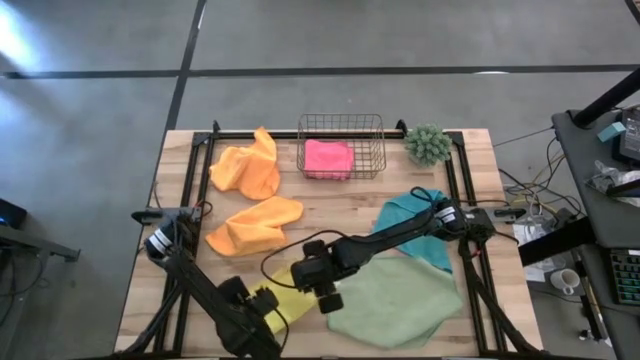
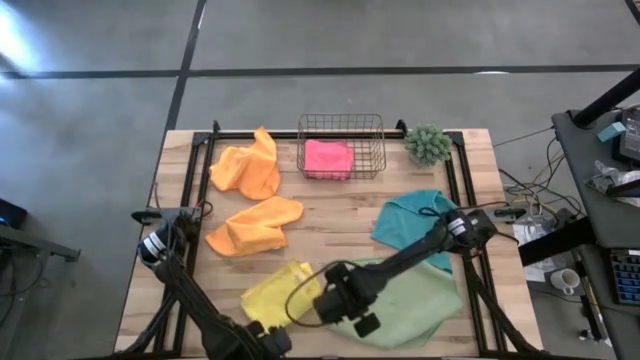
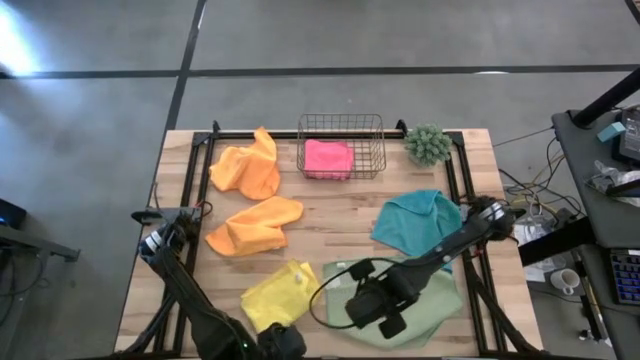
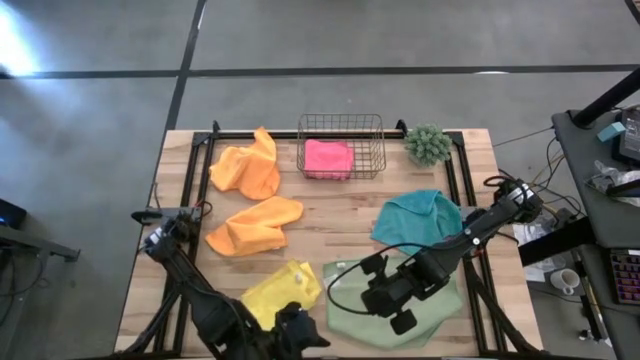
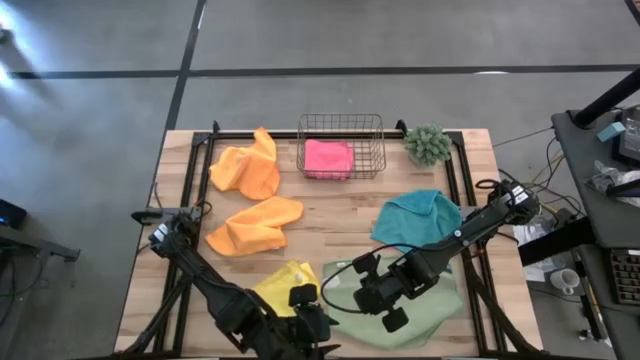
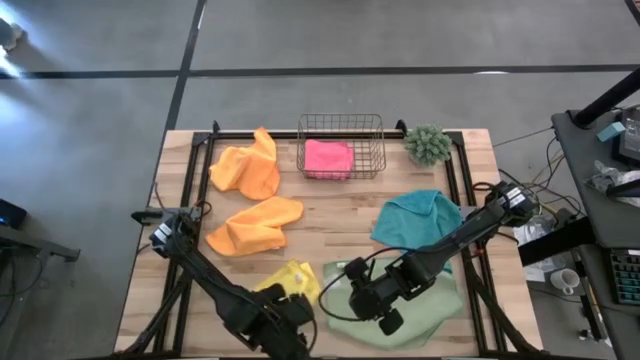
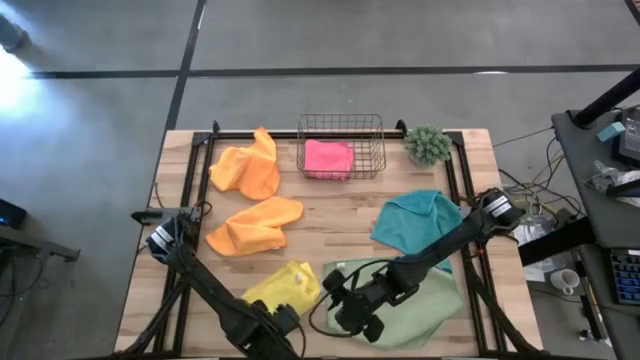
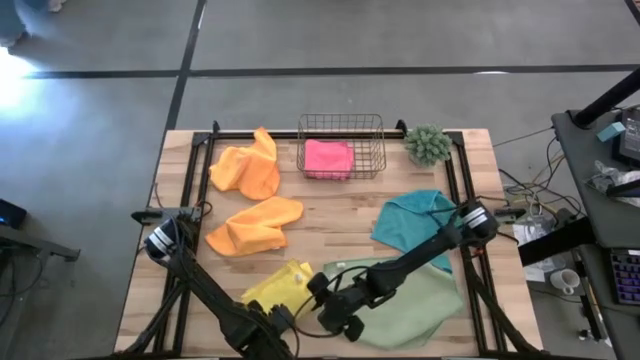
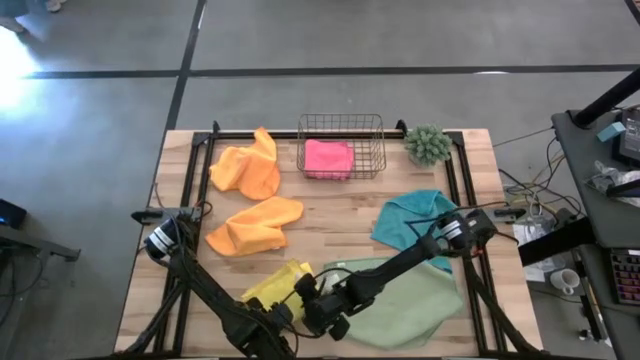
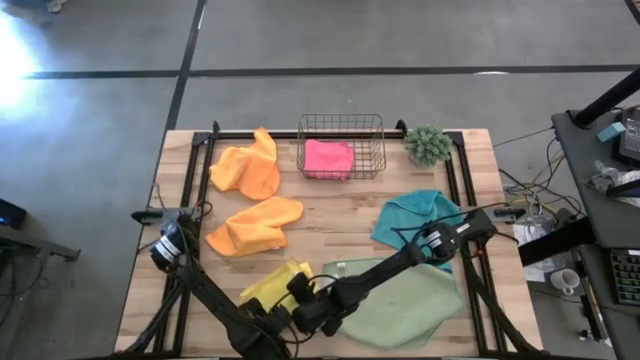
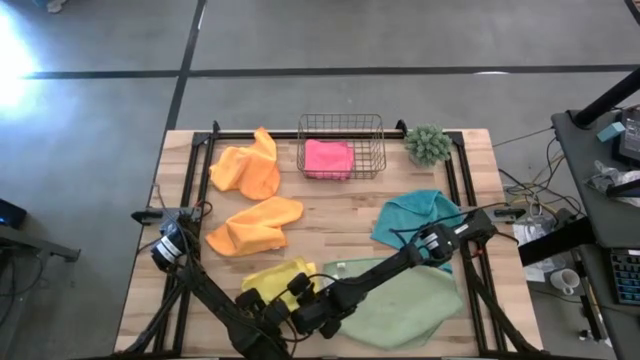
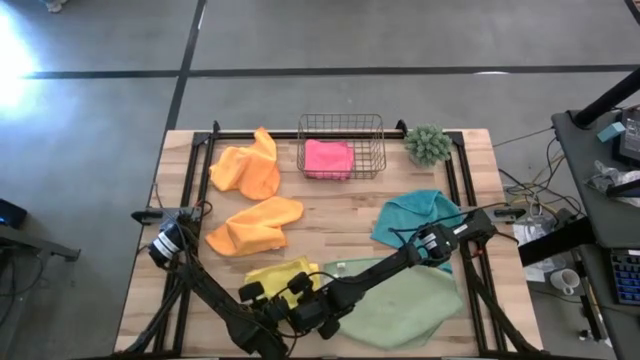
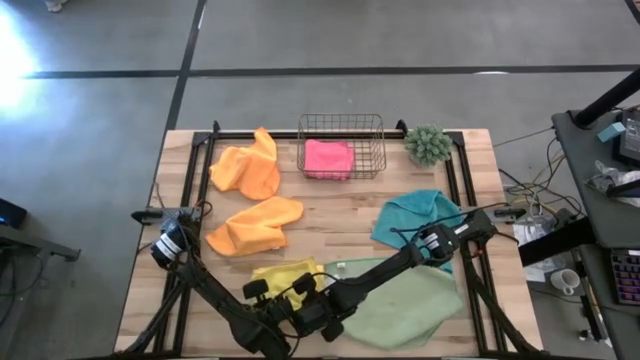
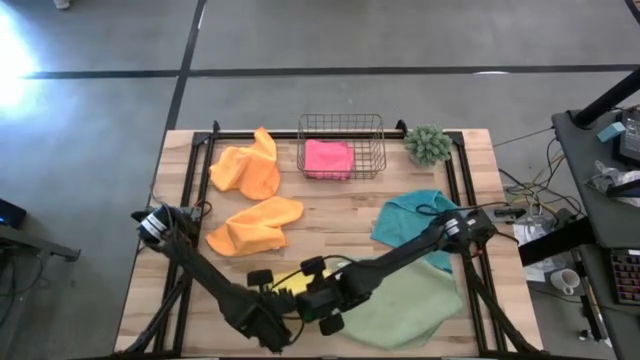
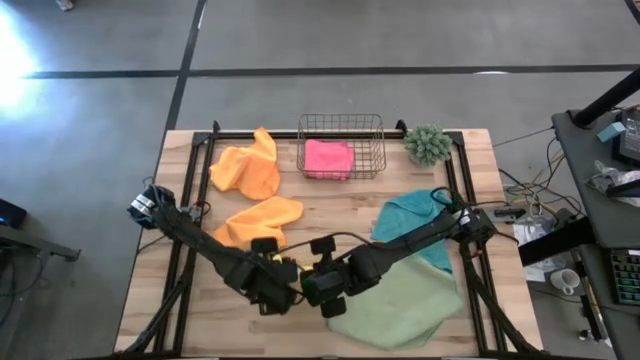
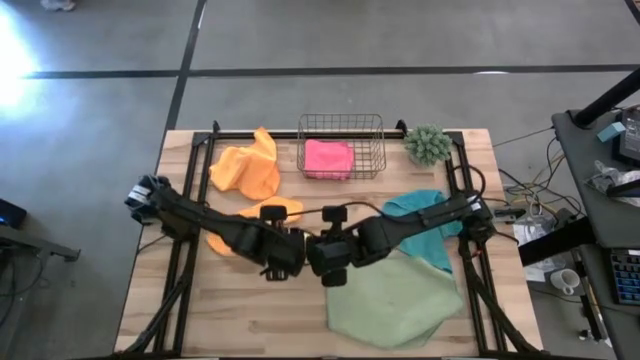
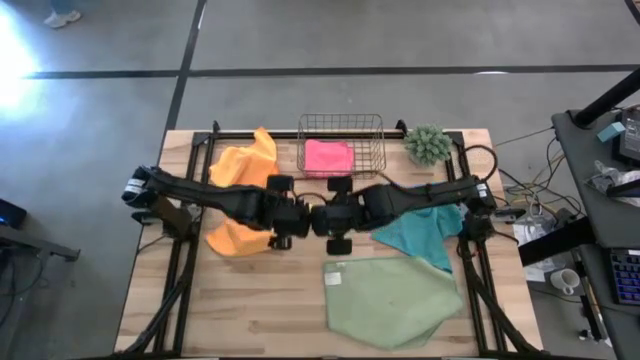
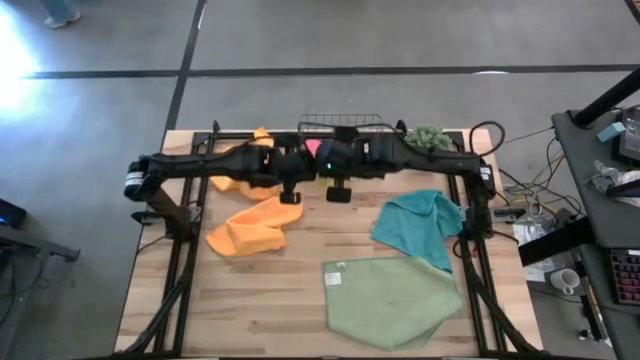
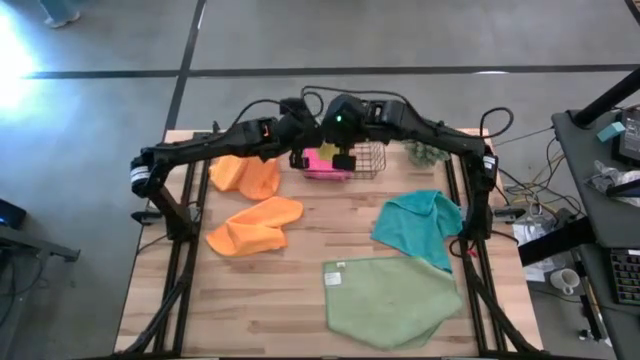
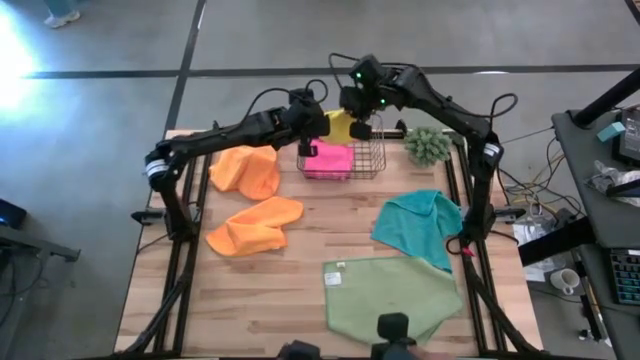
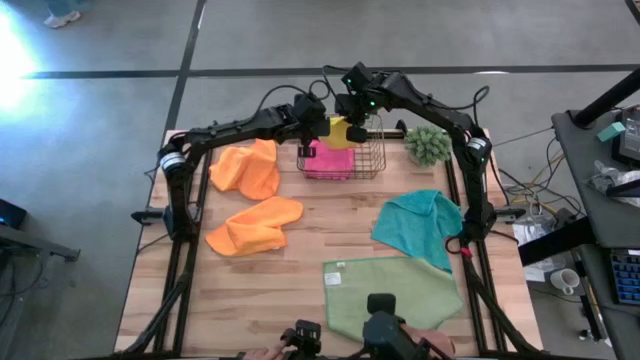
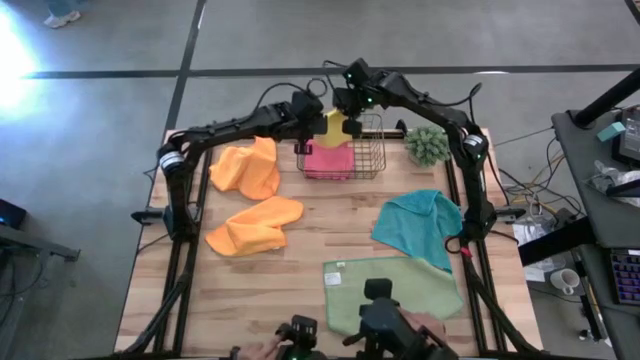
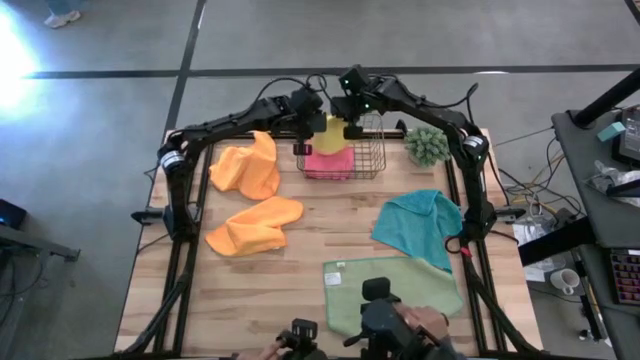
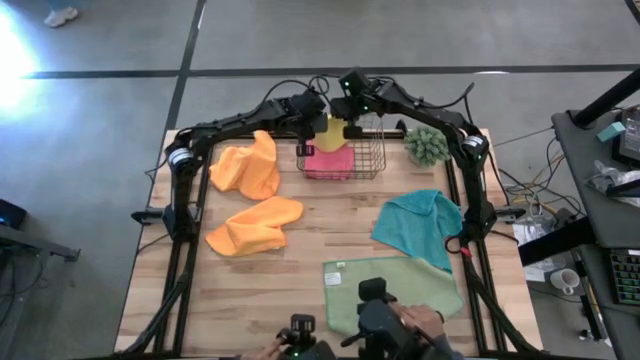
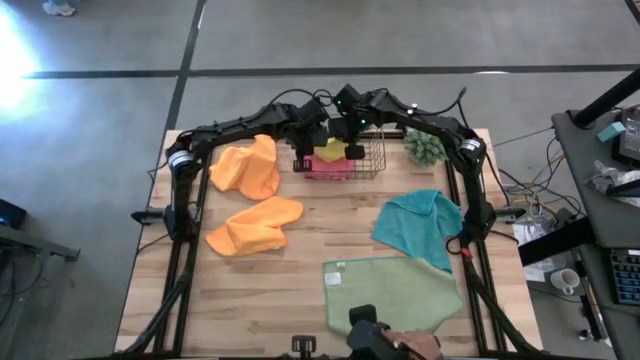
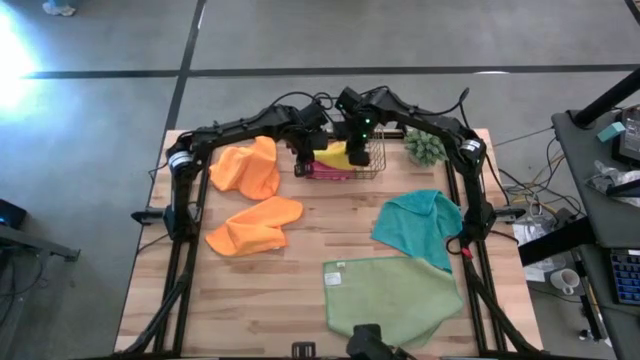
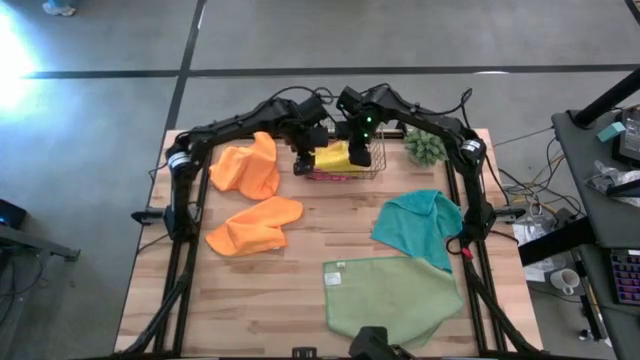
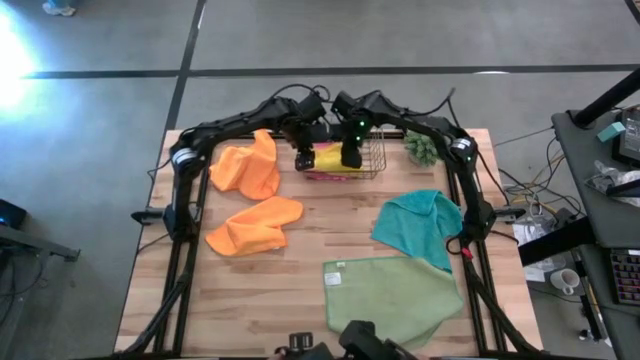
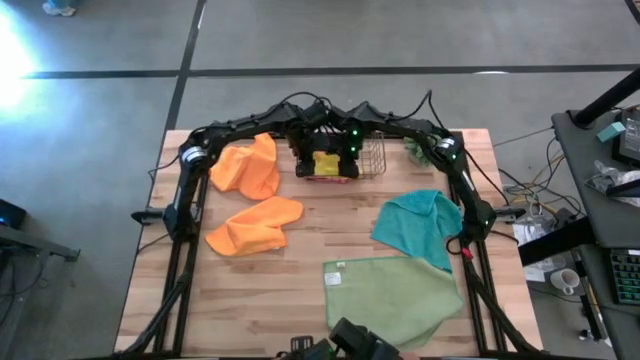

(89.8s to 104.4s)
Task: Fold microfiber towels
Put the folded yellow microfiber cloth into the gold wire basket

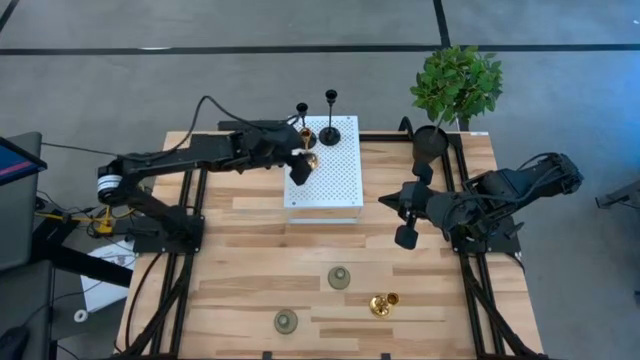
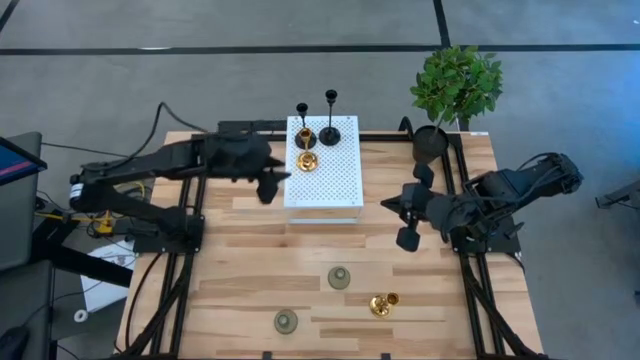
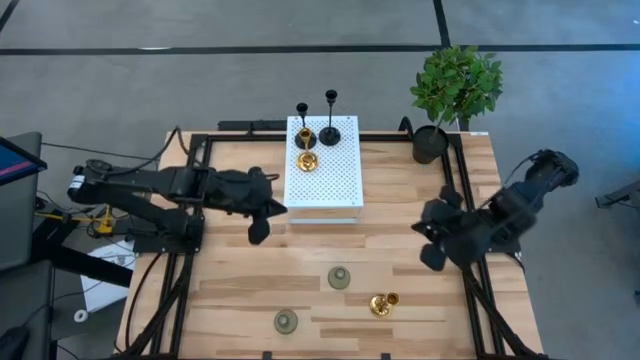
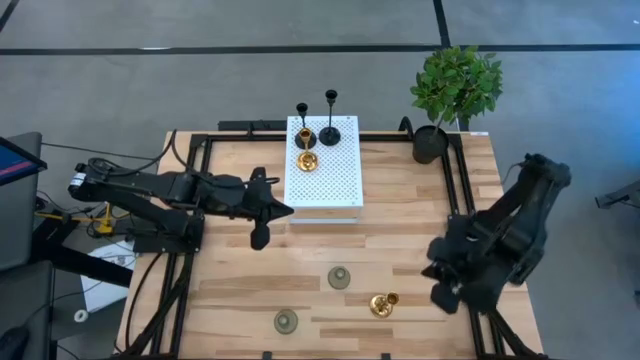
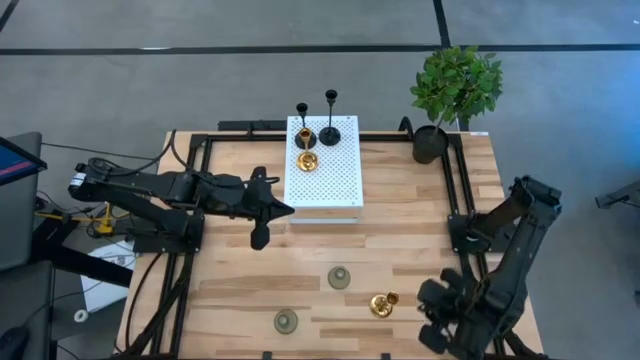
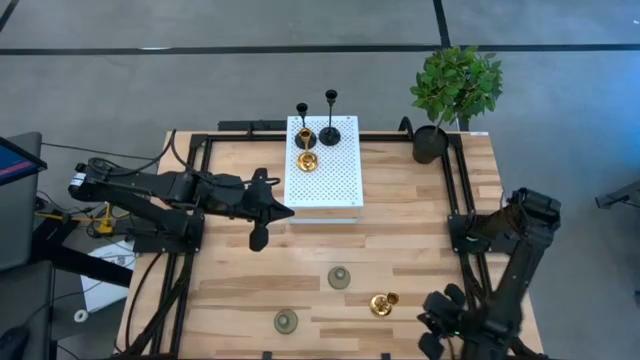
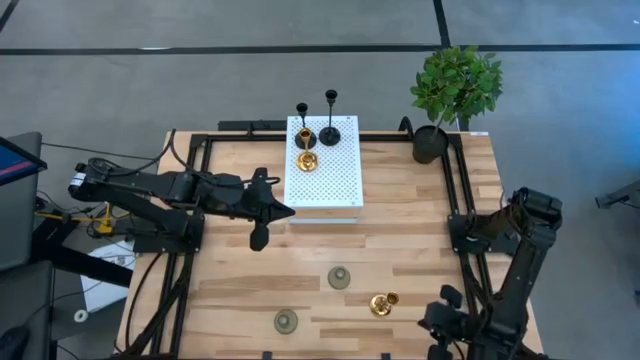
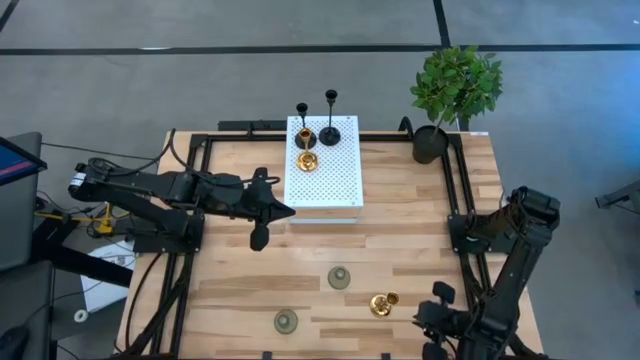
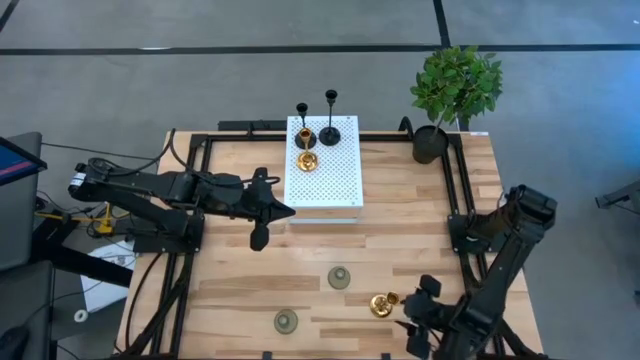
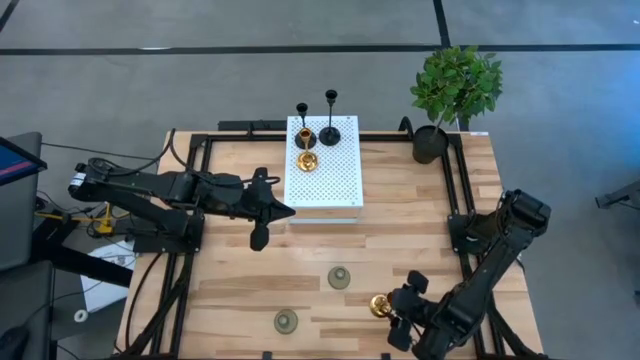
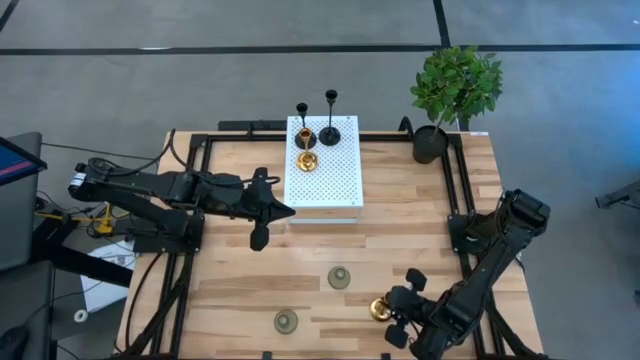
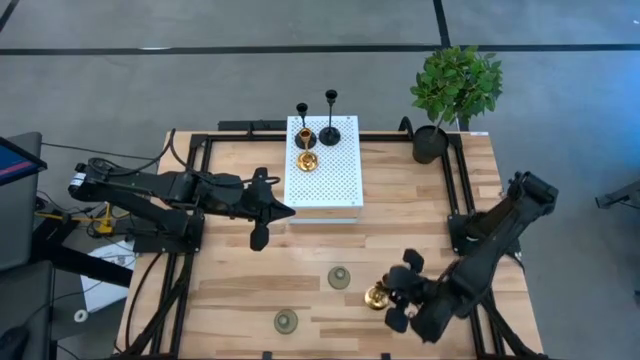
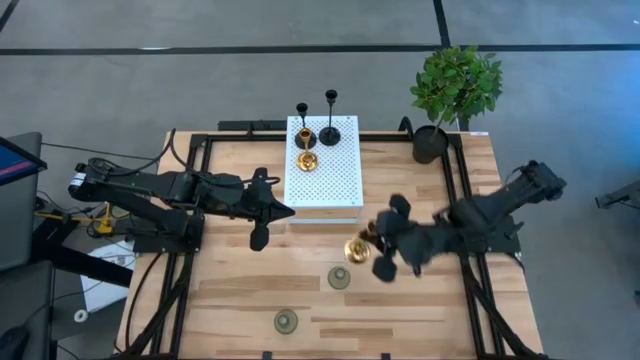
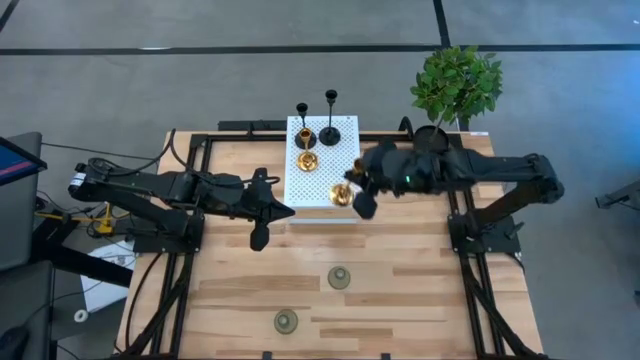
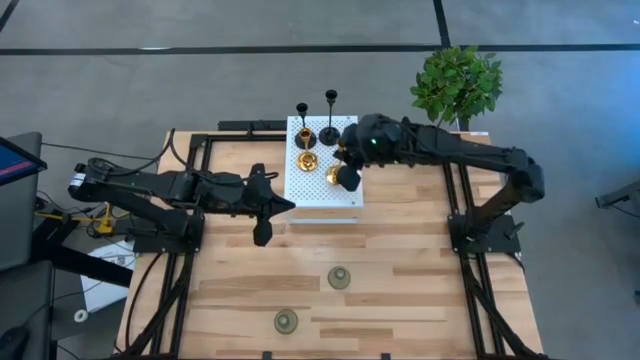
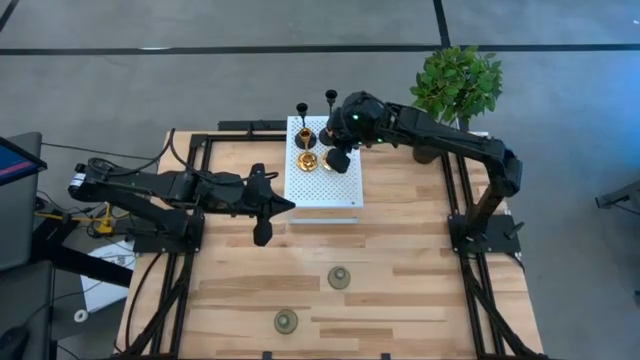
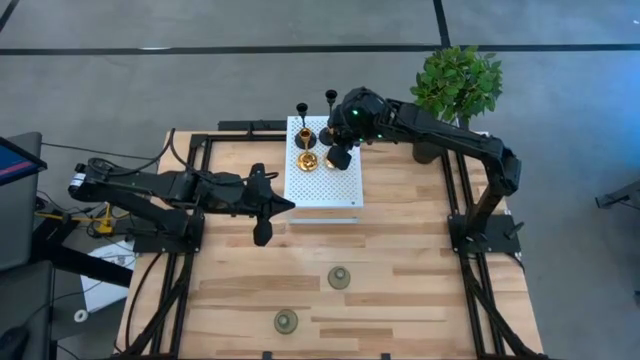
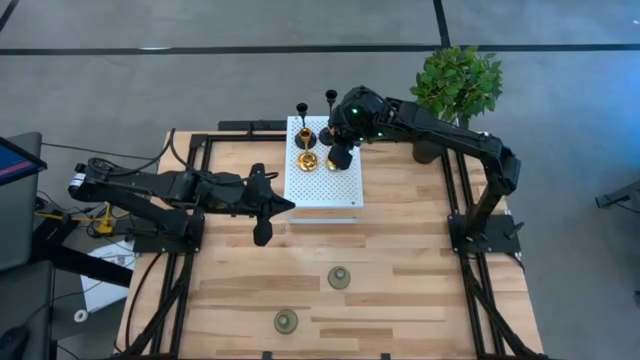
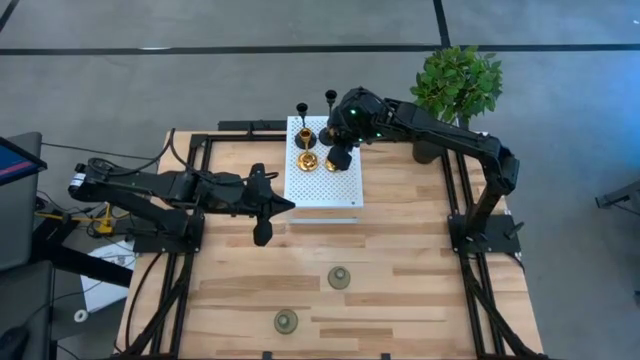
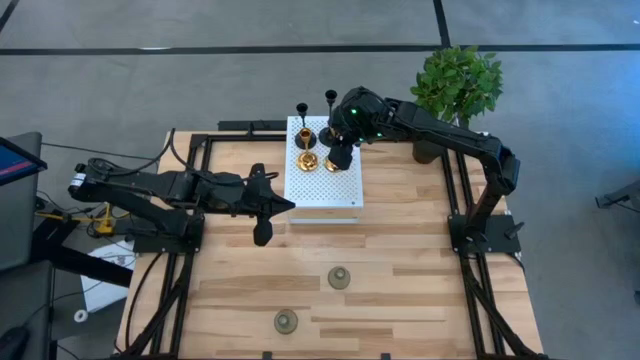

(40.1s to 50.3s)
Task: Pick & Place candle stick holders
Put the gold candle holder aligned with the other gold candle holder on the shelf
